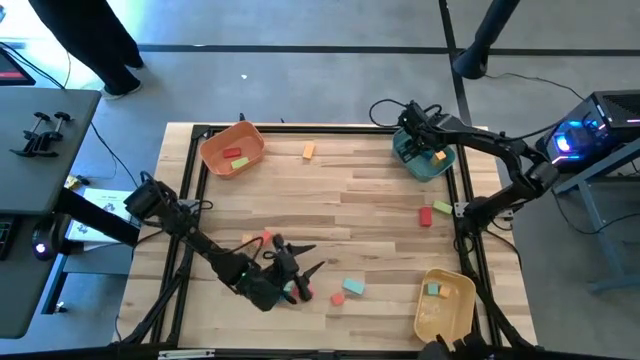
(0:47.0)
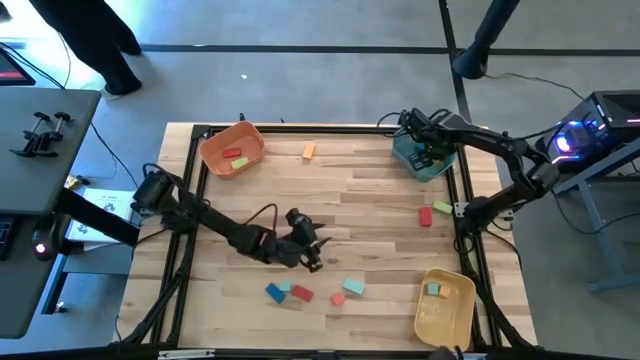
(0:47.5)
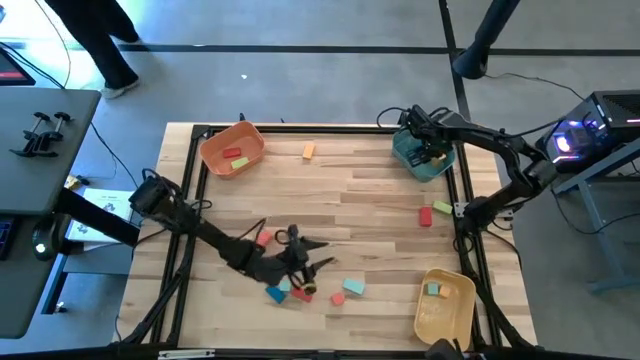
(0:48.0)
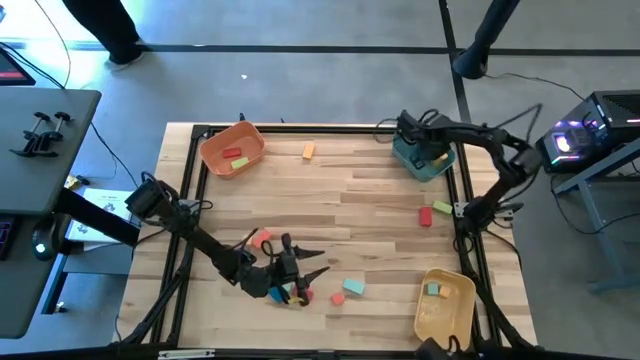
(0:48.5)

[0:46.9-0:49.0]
Task: Sort blocks by size
Adjust the thick yellow rectangular block in the green bin

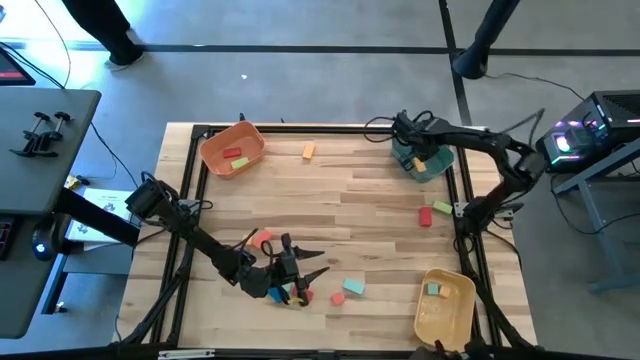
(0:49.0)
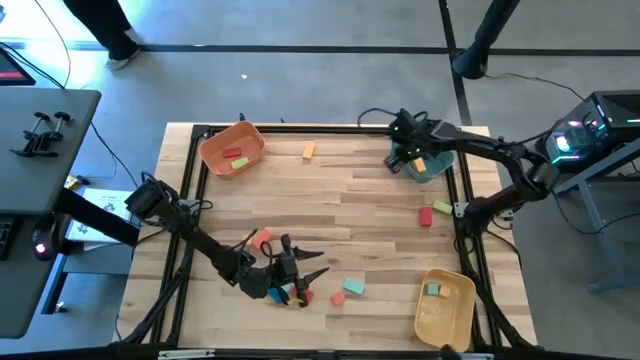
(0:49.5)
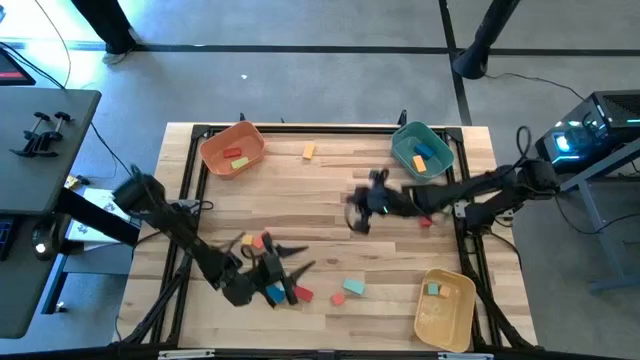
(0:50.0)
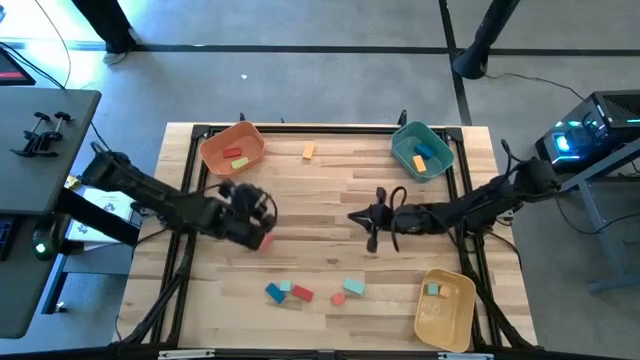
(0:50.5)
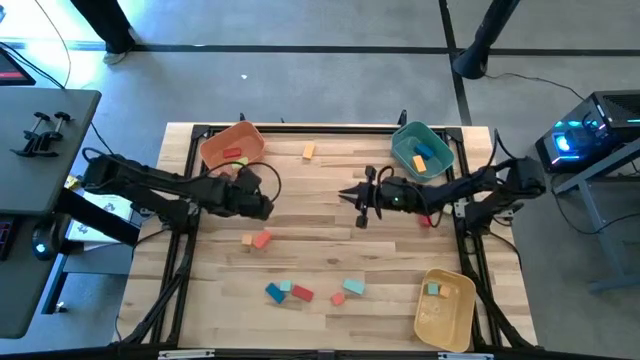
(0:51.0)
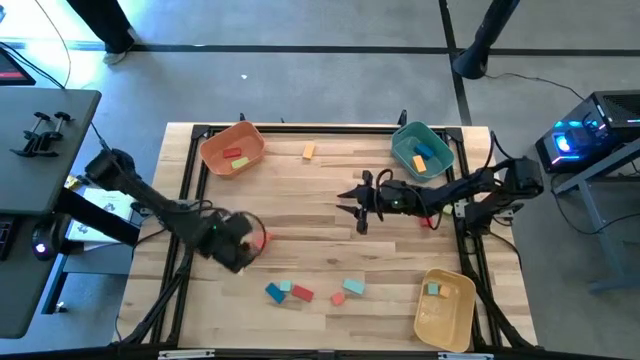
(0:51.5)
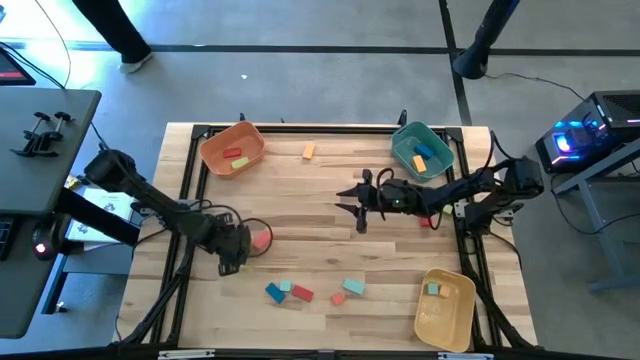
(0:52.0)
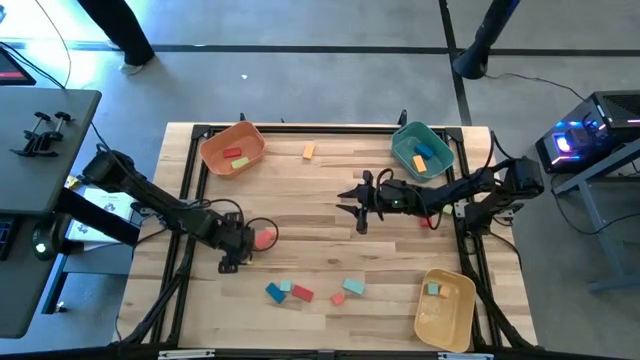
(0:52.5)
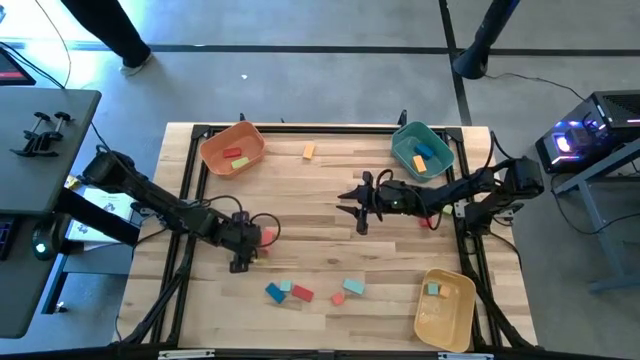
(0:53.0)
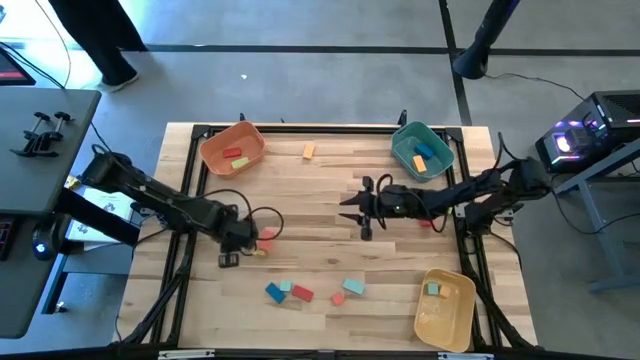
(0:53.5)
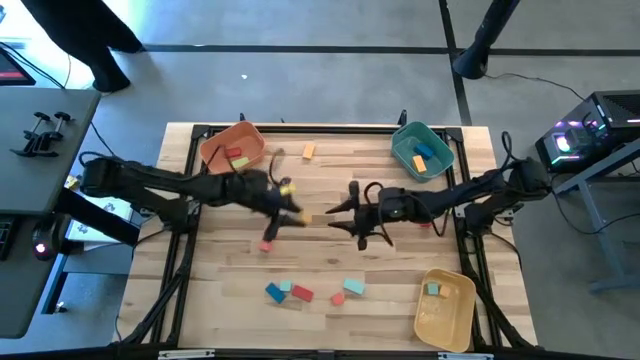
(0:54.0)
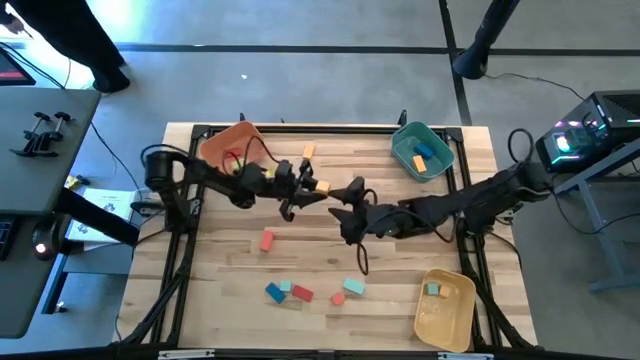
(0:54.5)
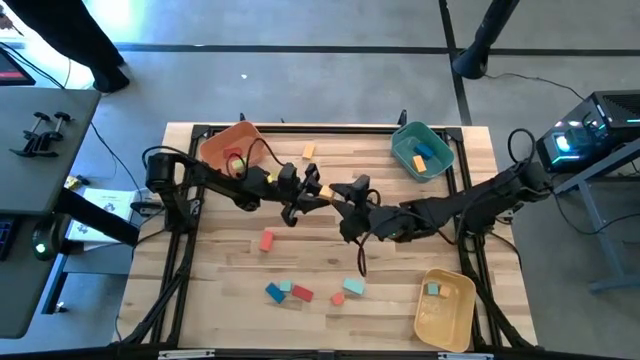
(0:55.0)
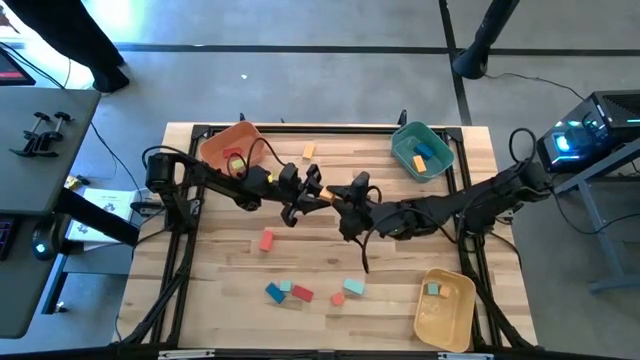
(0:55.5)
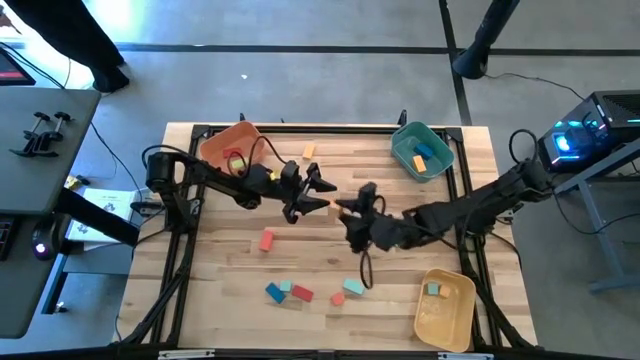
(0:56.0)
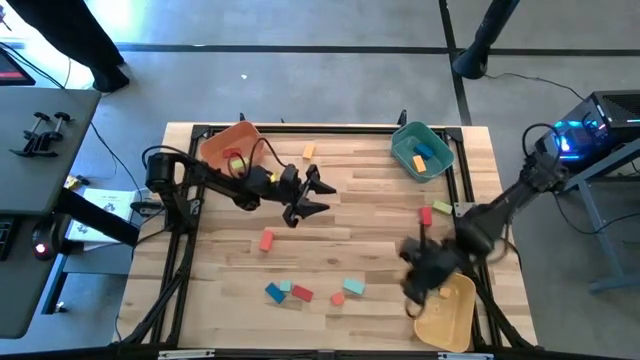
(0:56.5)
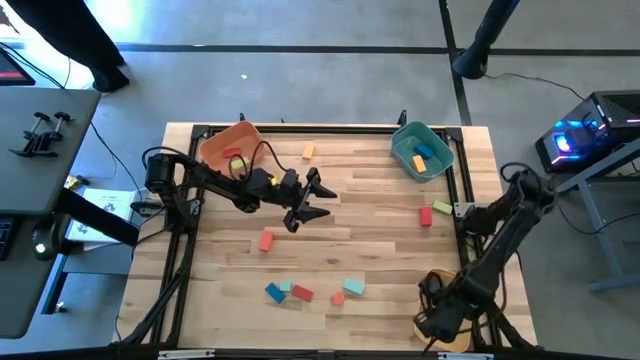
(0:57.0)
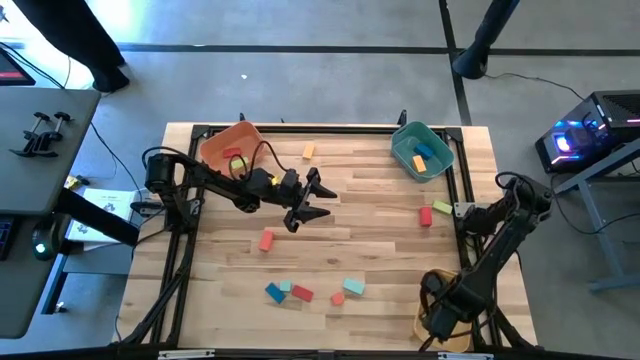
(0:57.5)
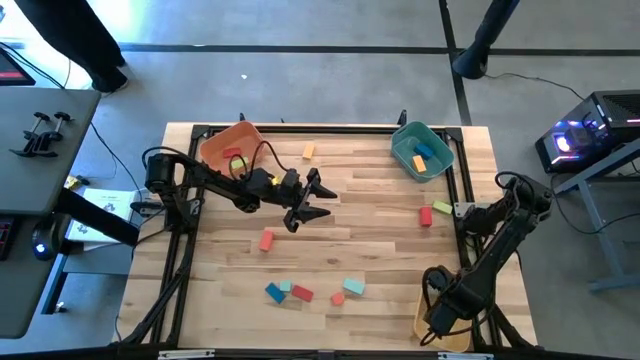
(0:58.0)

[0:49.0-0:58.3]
Put the yellow cube block into the yellow bin

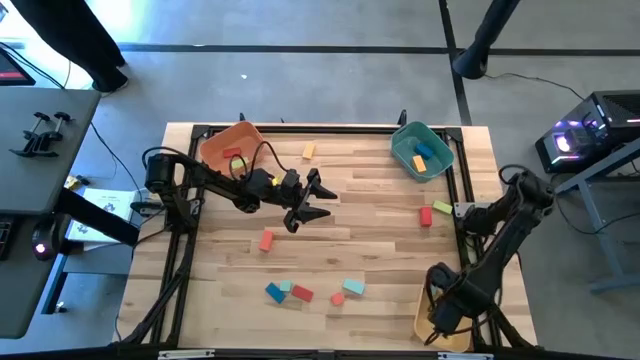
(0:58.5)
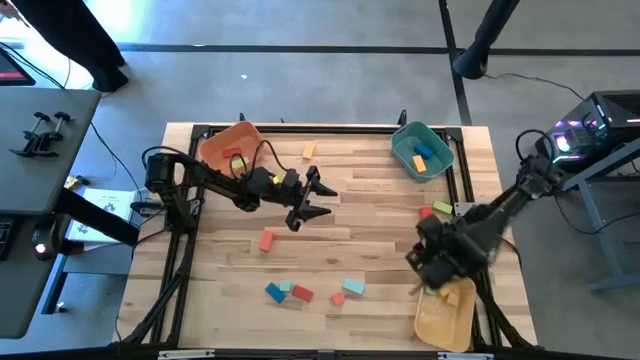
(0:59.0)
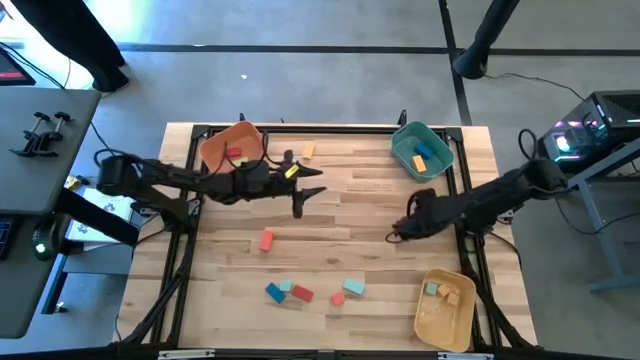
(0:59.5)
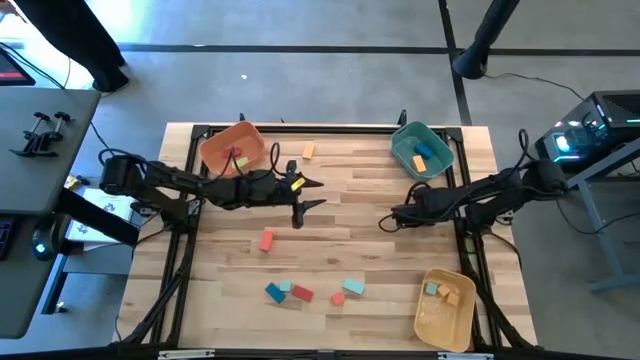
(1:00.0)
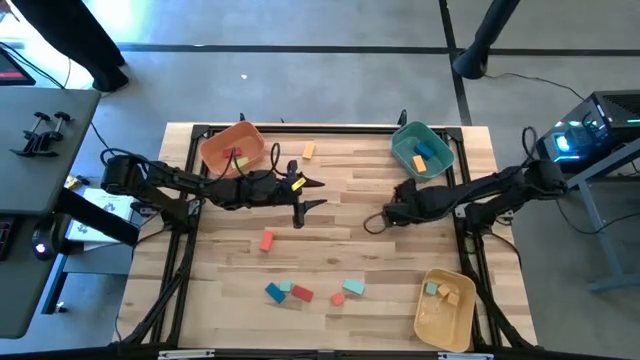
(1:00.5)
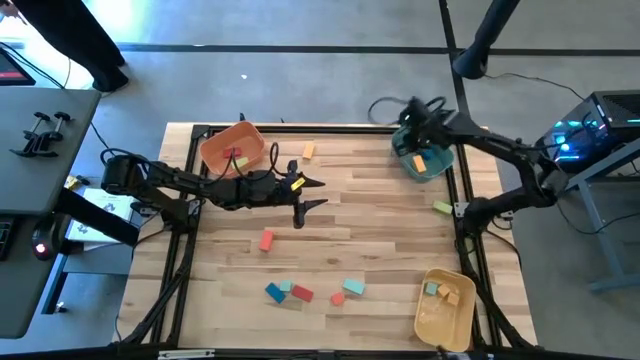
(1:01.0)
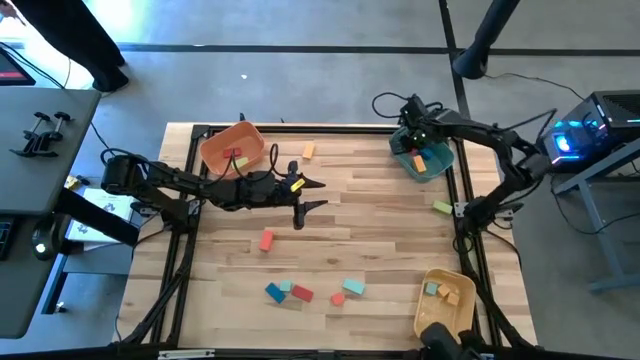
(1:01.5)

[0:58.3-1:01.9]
Put the thick red rectangular block into the green bin

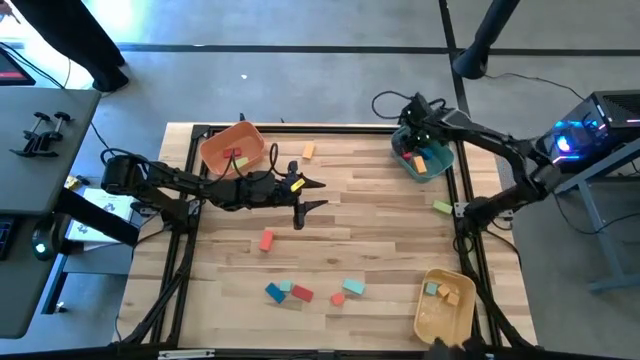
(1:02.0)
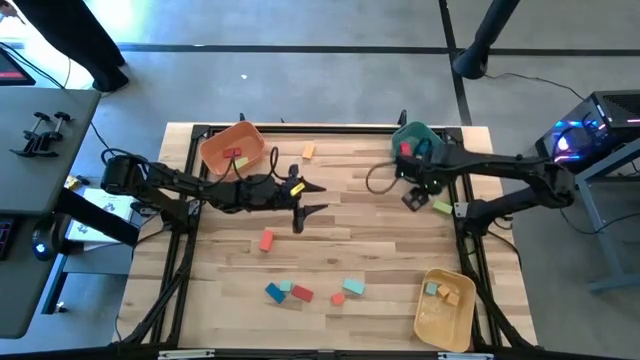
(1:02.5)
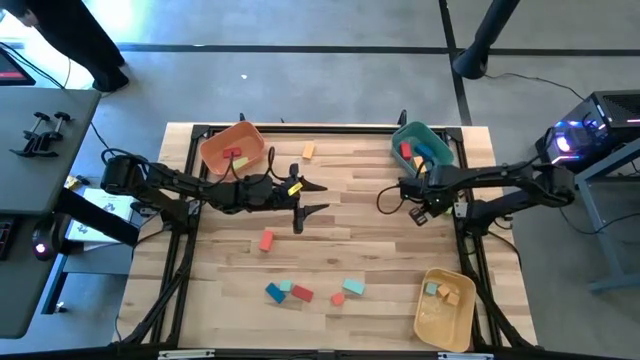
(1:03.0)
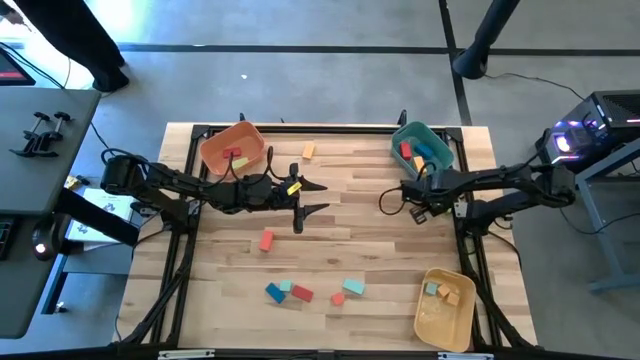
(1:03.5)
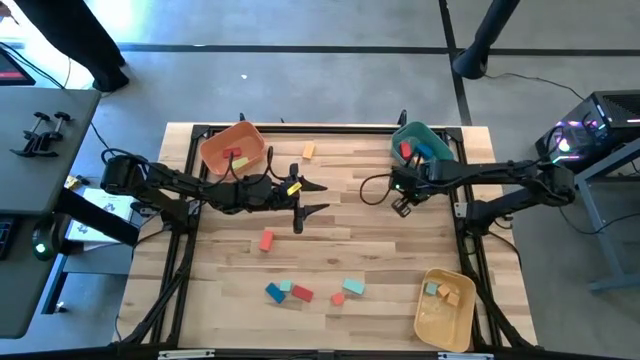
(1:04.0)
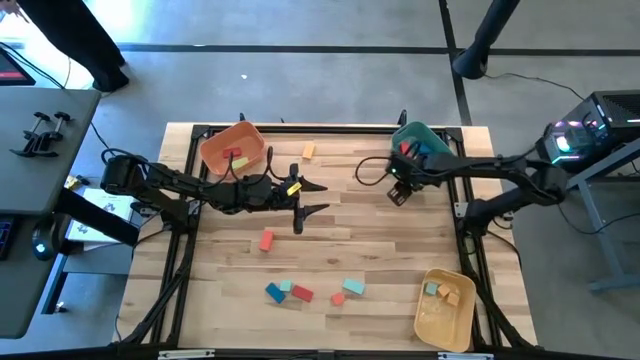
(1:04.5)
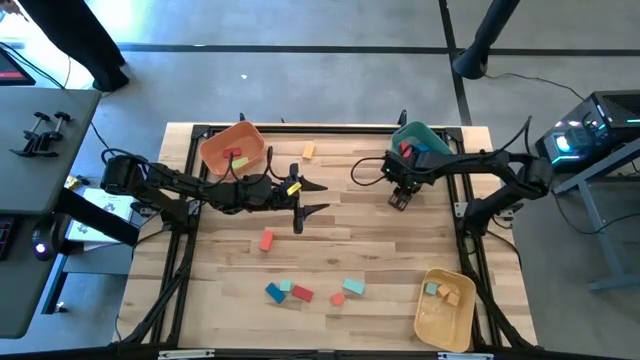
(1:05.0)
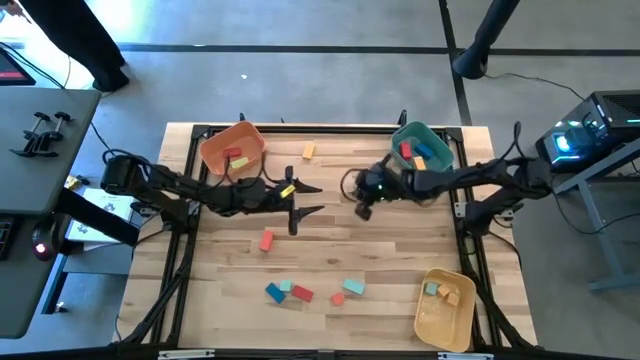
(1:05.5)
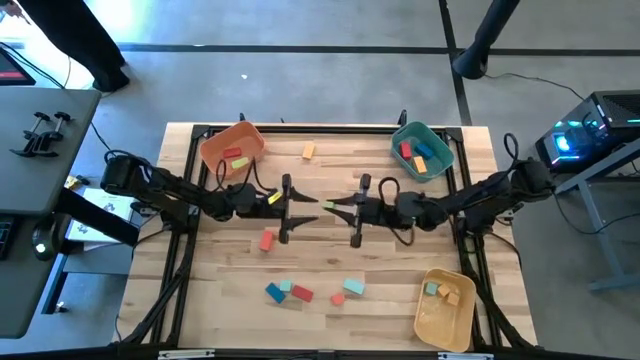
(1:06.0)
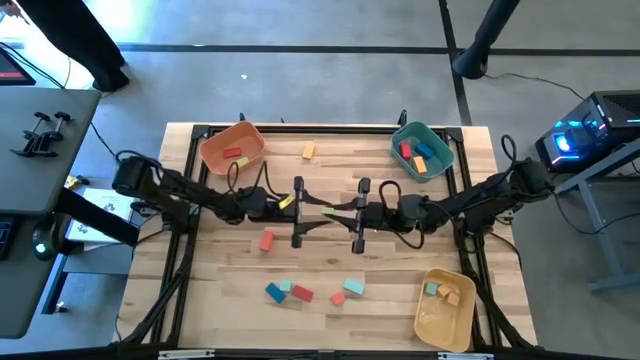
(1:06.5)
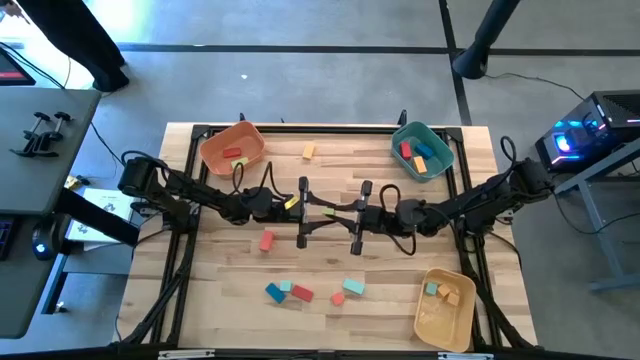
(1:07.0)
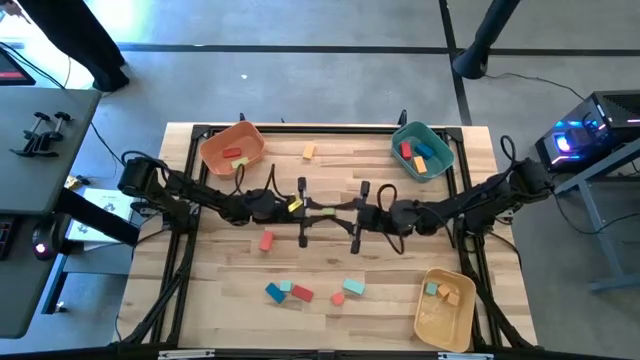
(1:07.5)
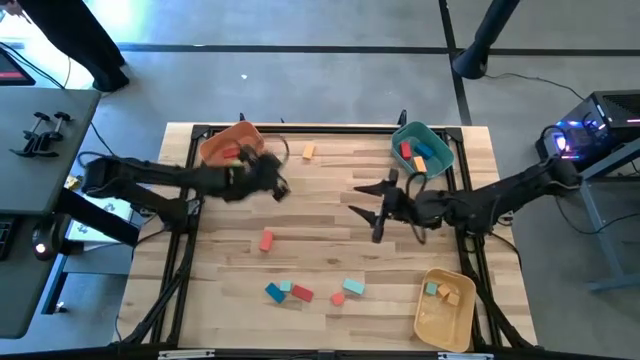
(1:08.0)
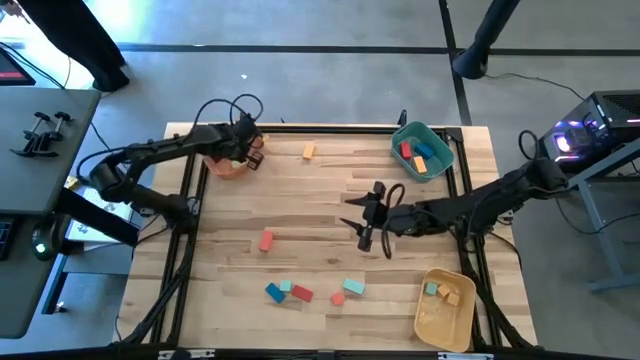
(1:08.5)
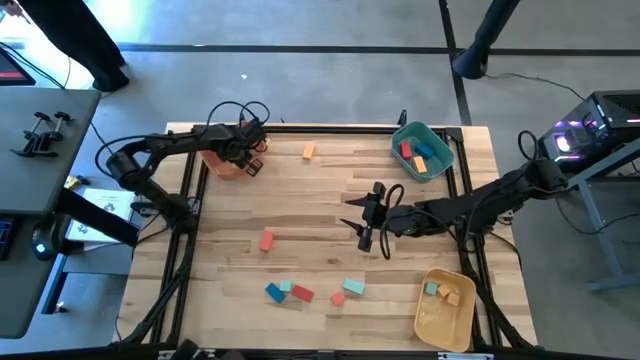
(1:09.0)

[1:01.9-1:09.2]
Put the thin green rectangular block into the orange bin
